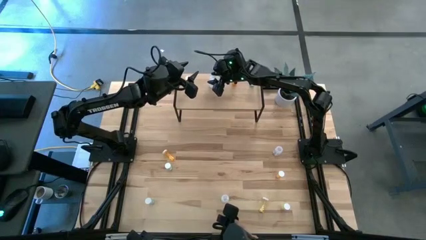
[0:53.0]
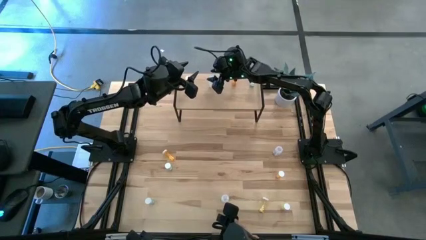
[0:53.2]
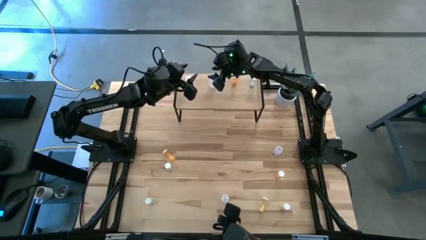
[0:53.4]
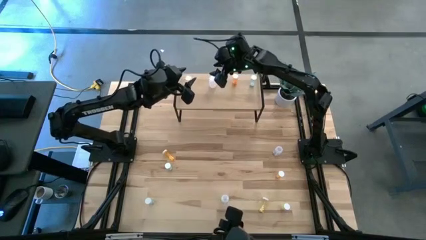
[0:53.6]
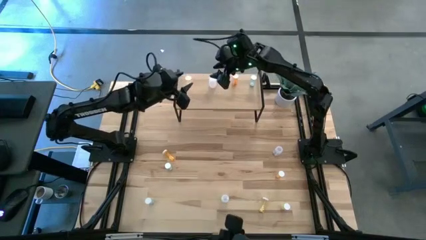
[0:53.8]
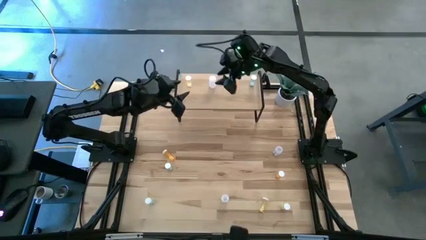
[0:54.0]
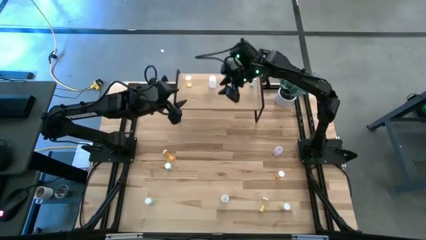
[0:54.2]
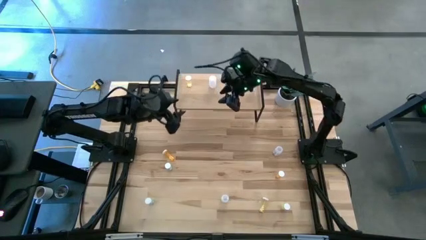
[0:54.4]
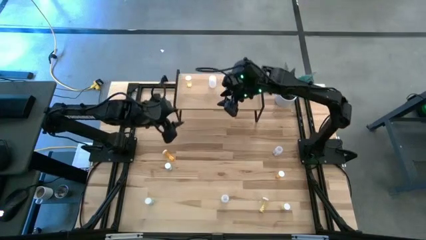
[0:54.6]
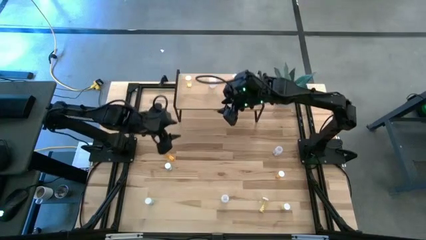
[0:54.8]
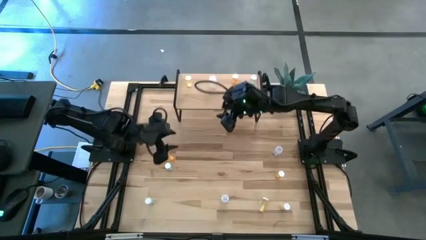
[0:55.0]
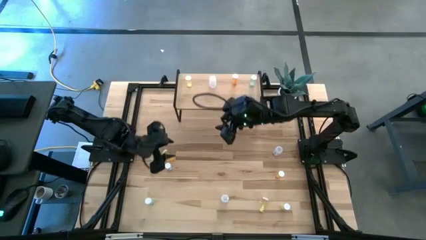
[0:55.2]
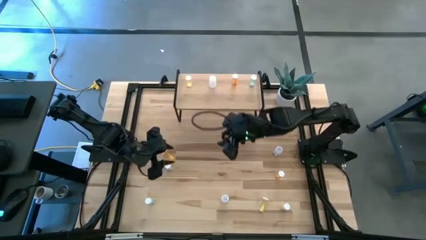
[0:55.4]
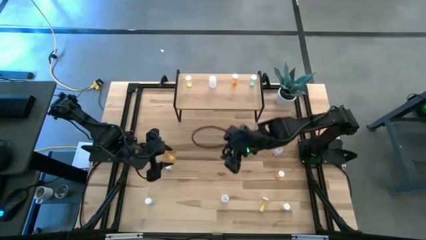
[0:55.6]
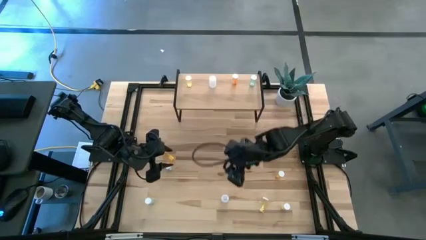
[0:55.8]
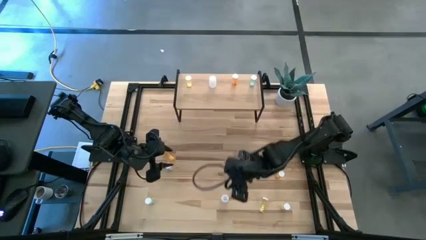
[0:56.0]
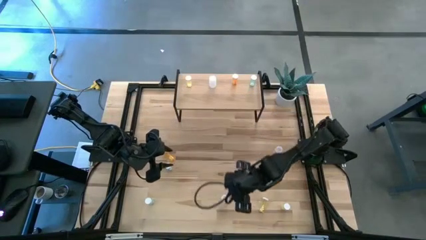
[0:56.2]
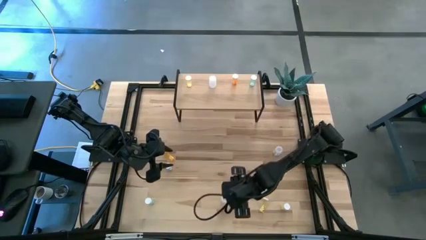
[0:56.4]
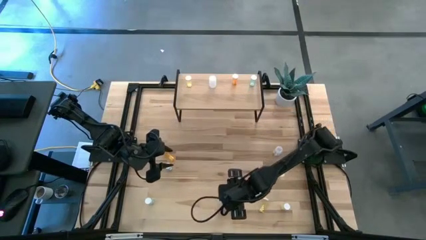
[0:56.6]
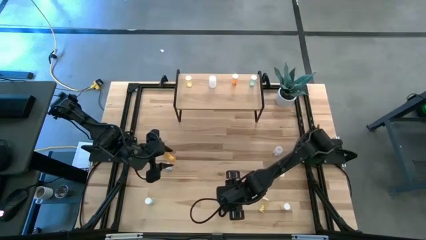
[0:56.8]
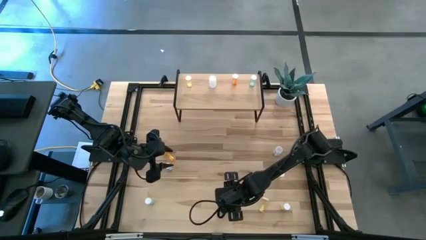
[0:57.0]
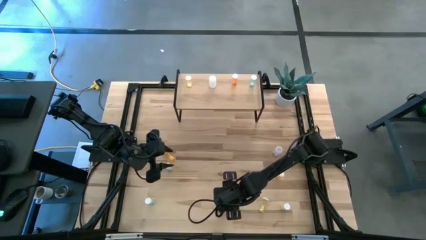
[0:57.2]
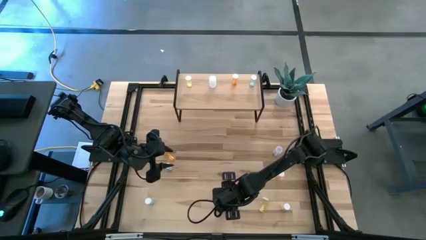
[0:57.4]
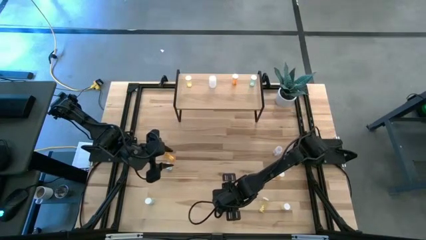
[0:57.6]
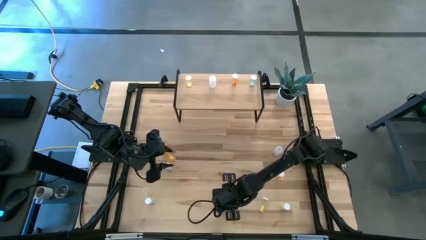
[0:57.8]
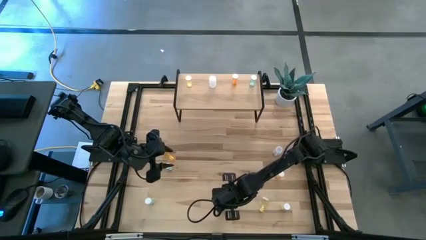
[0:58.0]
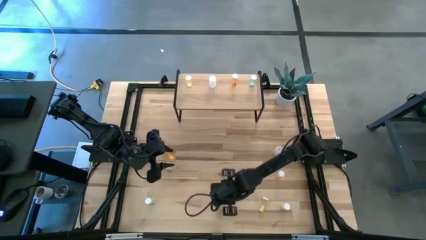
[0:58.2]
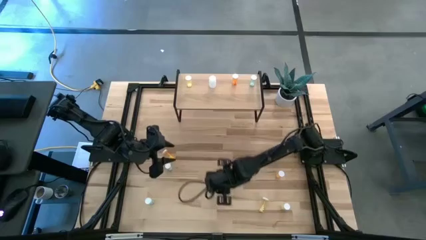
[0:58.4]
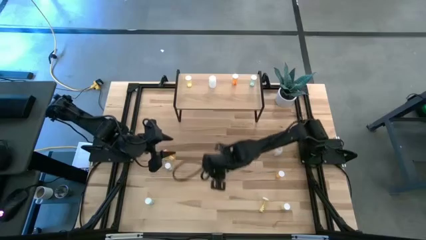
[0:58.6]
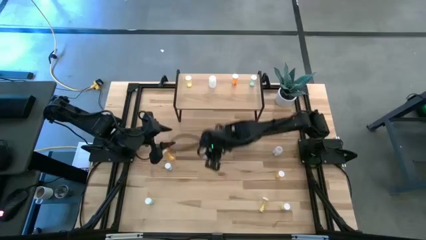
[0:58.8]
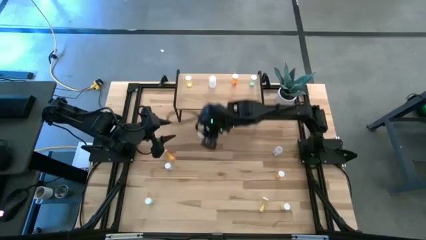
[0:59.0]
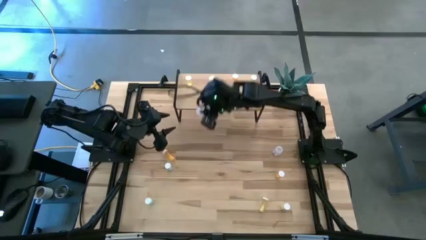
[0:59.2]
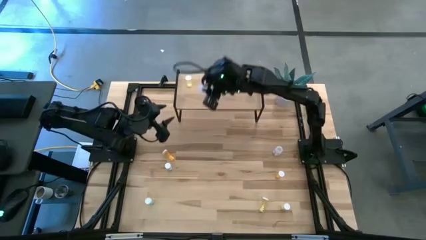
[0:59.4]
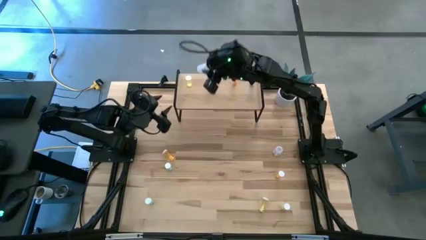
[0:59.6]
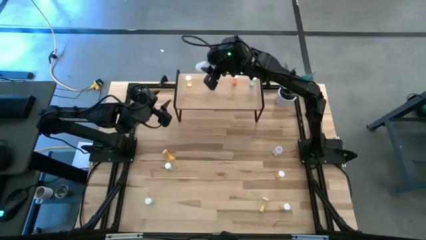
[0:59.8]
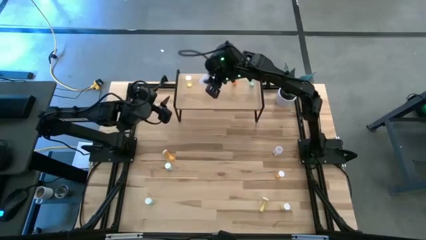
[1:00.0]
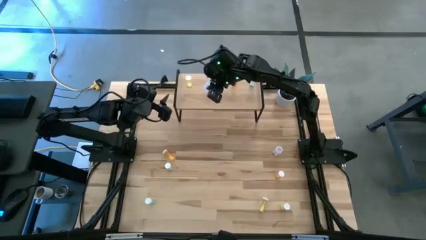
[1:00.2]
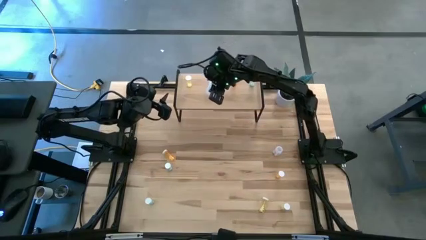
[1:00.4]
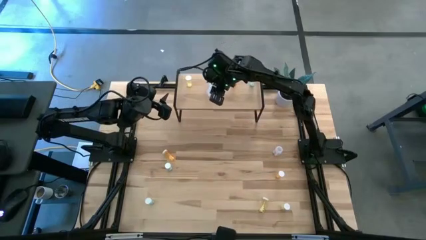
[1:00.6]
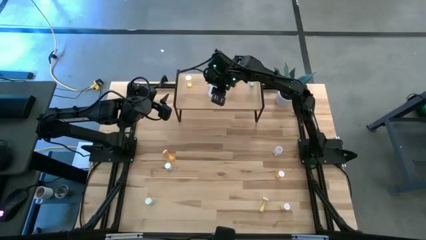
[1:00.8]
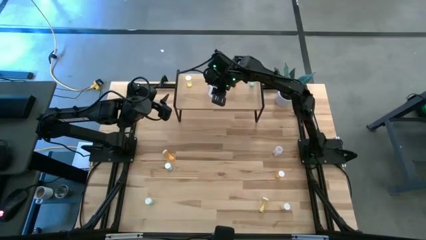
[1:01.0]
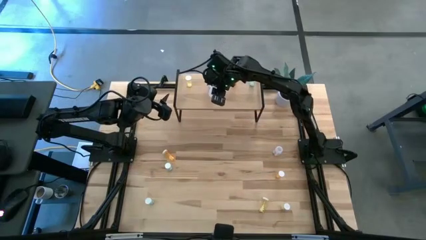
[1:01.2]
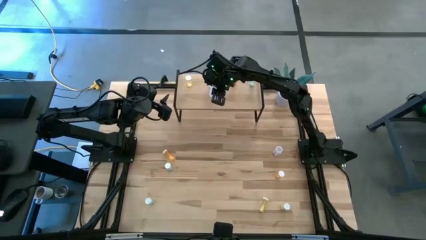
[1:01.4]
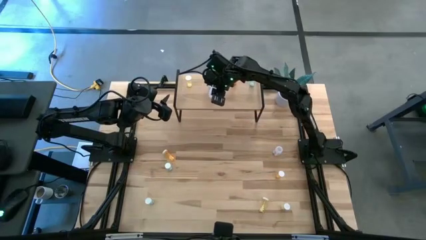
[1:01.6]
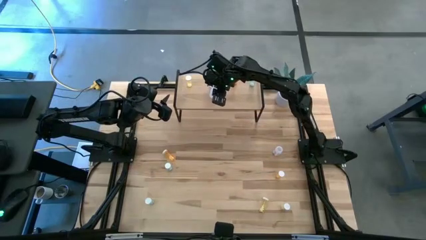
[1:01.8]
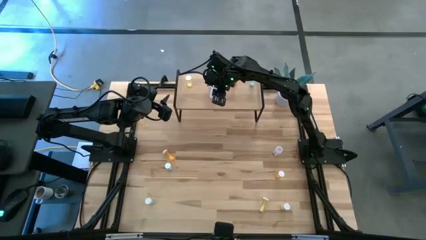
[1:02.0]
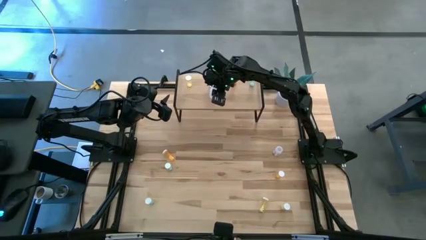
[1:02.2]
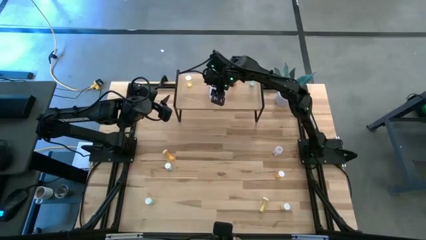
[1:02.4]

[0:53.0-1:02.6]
Task: Pick and place medicine bottles onto shelf by color
Put the bottom white medicine bottle on the shelf aligned with the other white medicine bottle

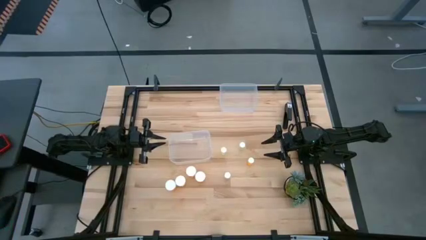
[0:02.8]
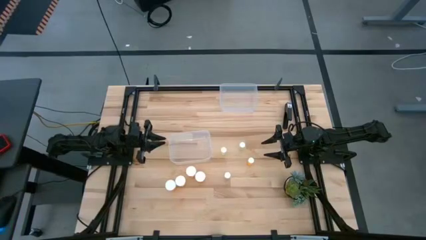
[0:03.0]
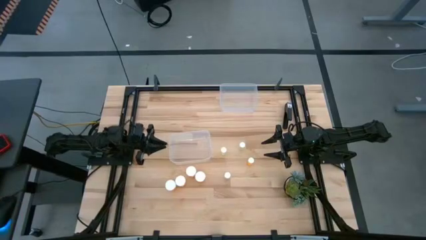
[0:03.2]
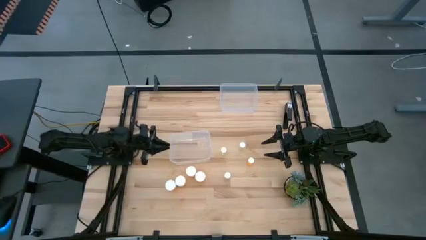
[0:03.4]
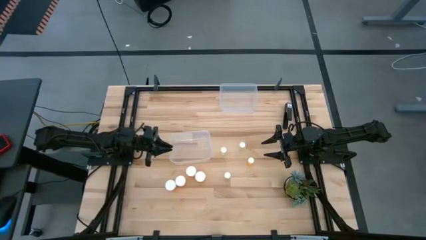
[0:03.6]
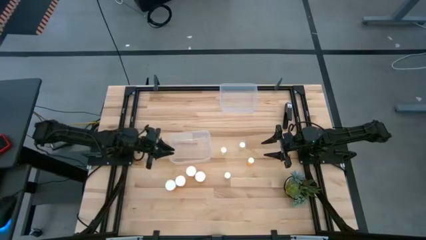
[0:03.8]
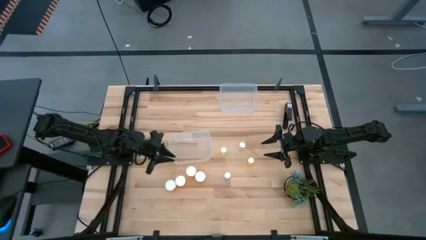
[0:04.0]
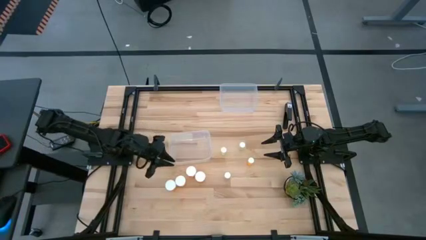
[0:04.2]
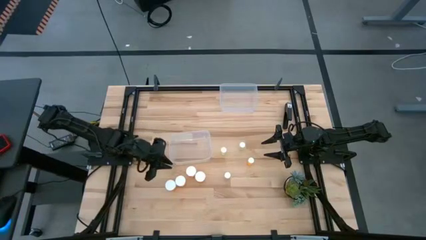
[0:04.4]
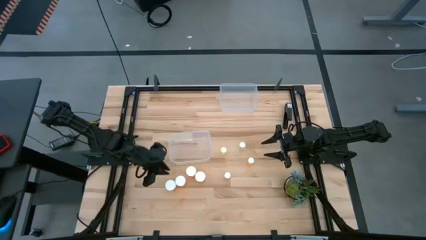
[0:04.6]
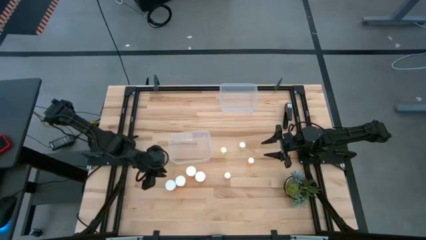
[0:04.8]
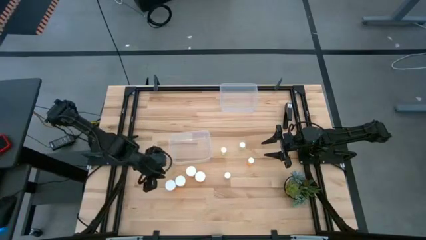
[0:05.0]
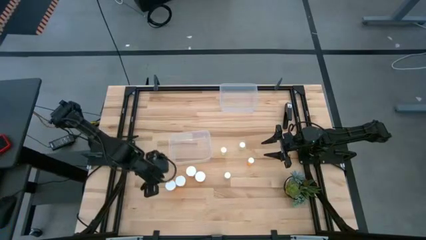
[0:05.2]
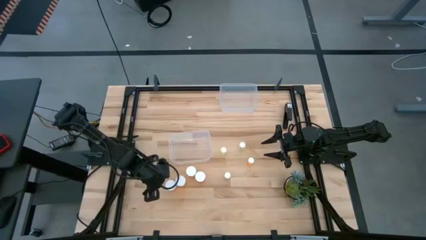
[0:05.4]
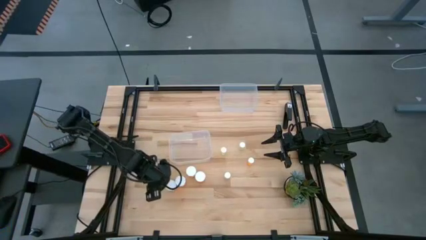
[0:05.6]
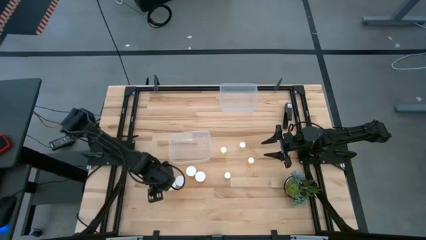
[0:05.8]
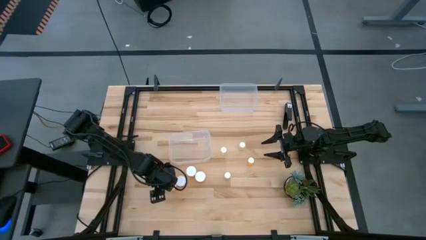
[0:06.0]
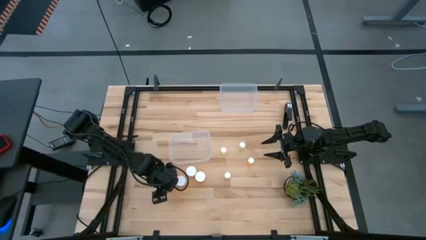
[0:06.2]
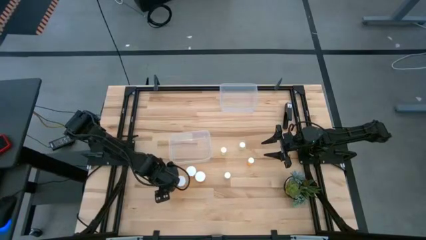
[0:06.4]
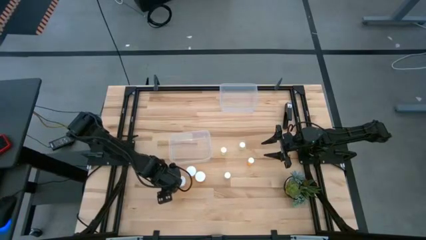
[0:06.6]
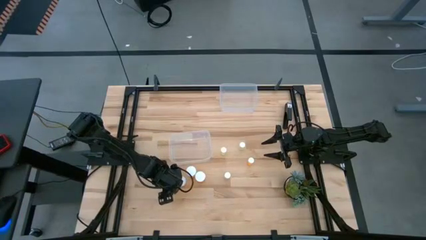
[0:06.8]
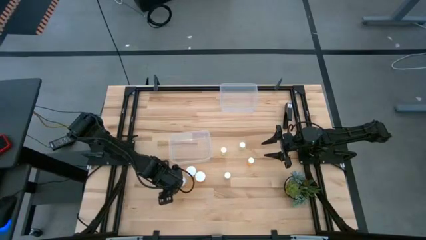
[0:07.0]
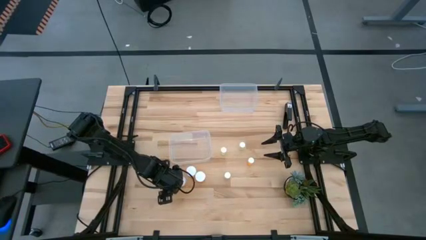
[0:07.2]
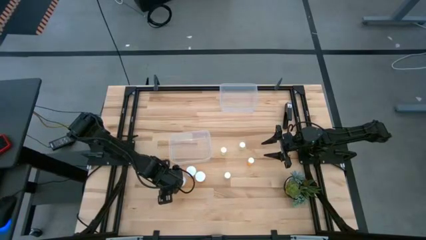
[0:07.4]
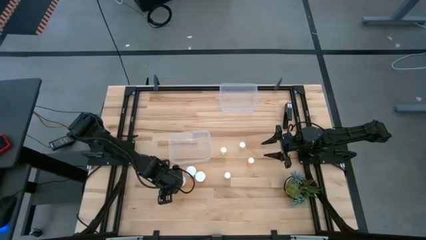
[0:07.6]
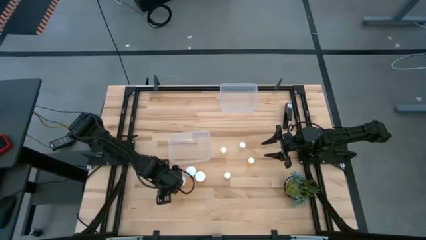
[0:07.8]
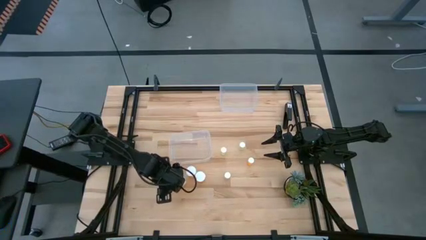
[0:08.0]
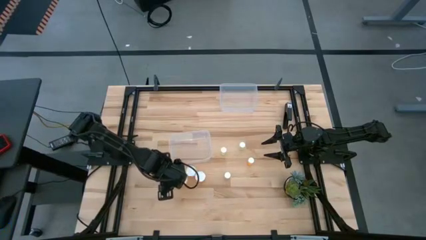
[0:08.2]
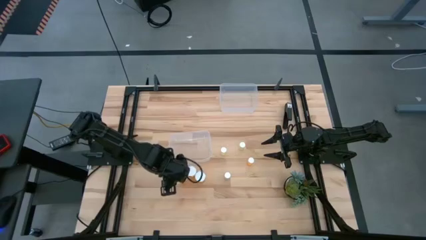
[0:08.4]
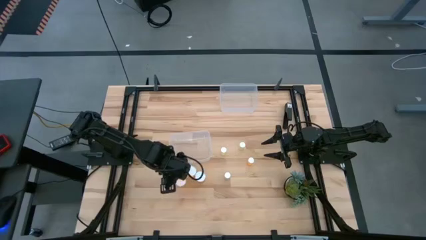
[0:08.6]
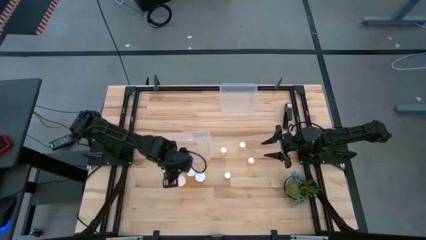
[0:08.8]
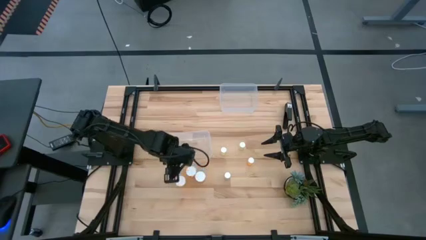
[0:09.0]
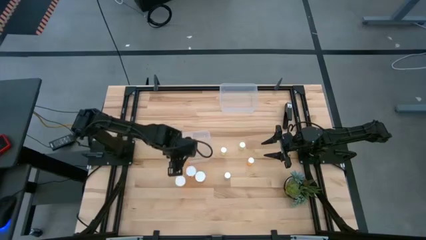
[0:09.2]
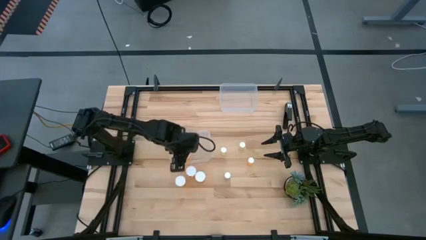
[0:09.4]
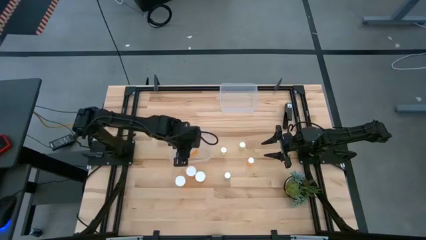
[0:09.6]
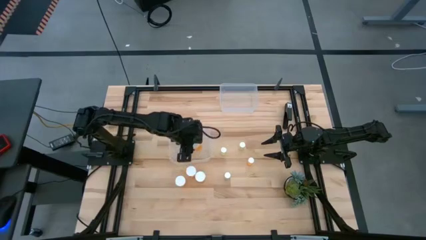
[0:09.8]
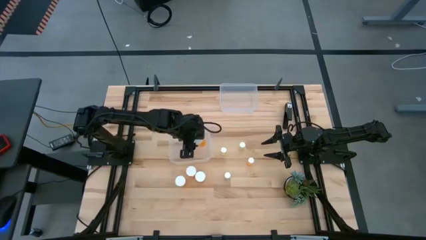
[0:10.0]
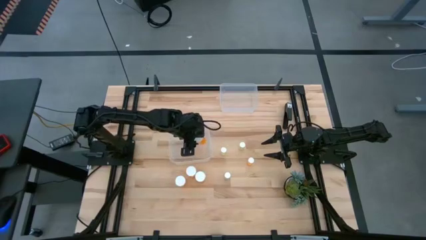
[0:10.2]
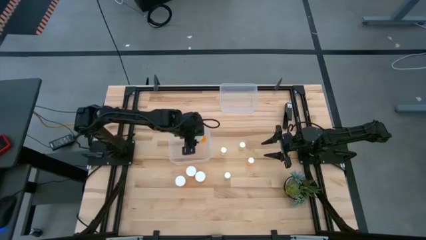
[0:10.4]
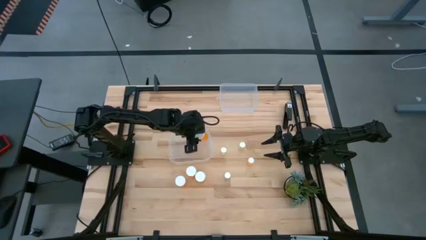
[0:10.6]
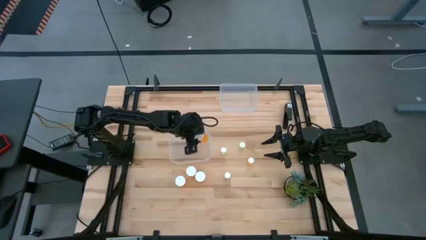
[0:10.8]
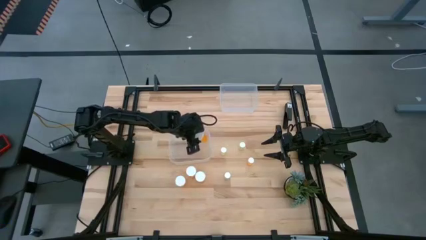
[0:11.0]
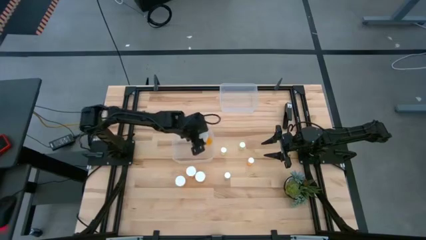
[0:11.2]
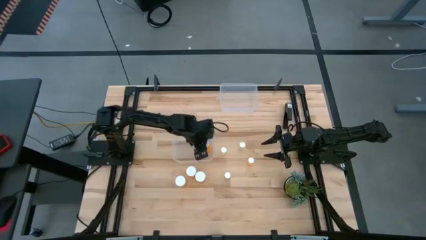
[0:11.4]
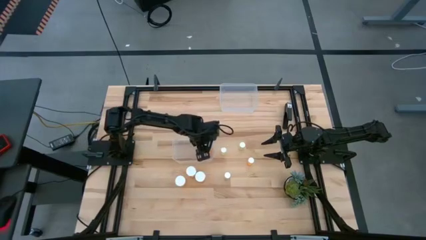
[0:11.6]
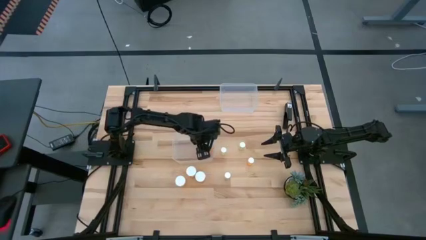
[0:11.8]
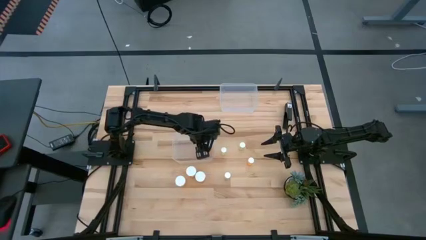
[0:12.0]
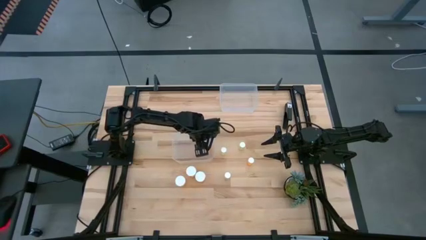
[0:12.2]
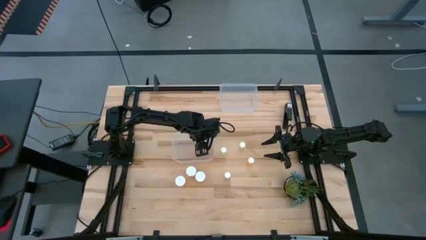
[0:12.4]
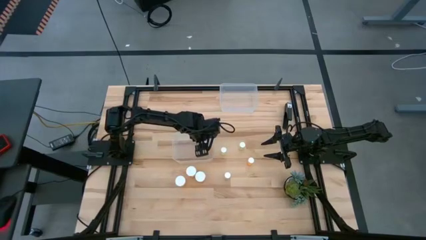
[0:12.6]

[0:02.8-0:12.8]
Task: Pick and place medicine bottles into bin by pill shape (circle, oval)
Put the large orange pill bottle into the bottom transparent bin
